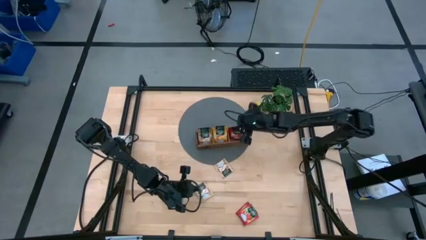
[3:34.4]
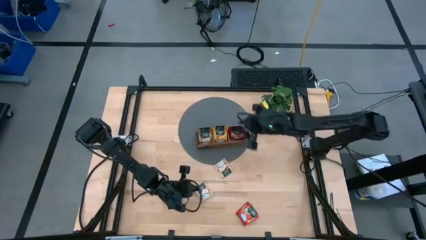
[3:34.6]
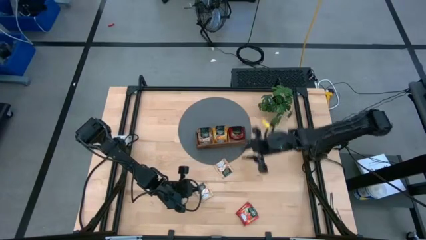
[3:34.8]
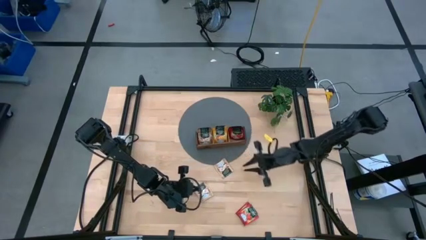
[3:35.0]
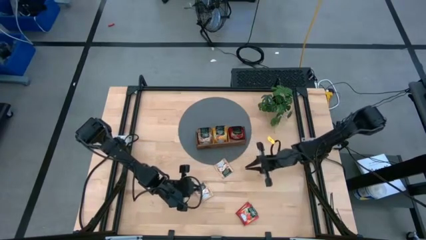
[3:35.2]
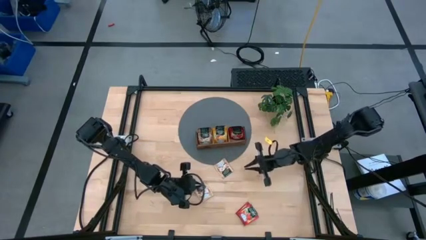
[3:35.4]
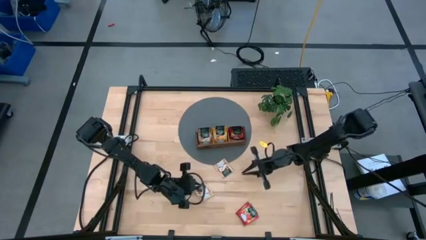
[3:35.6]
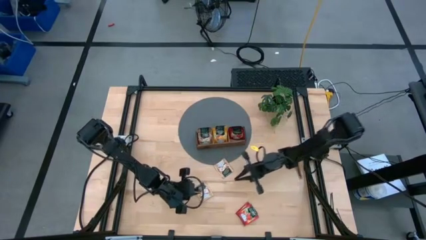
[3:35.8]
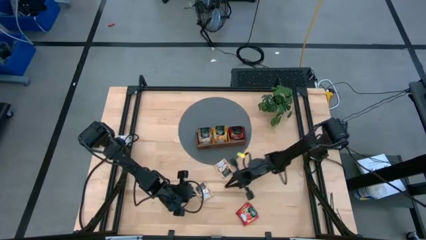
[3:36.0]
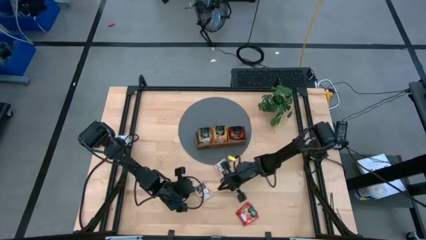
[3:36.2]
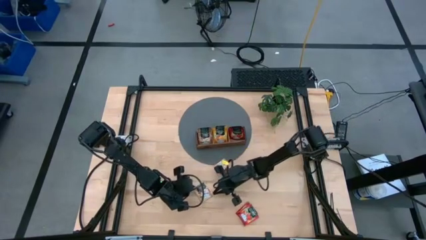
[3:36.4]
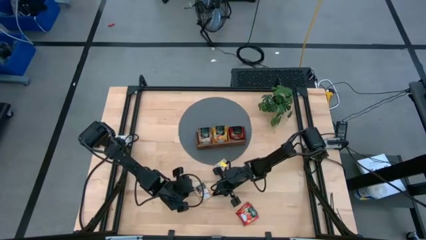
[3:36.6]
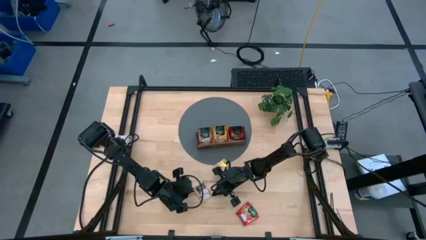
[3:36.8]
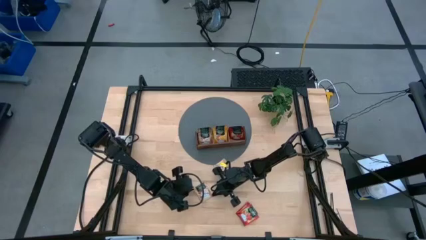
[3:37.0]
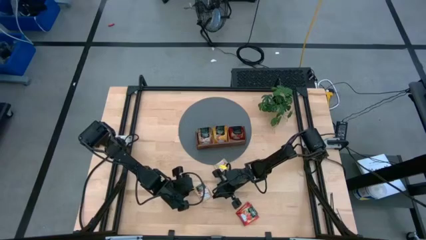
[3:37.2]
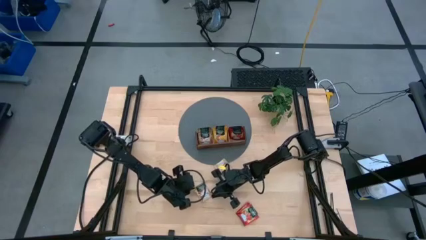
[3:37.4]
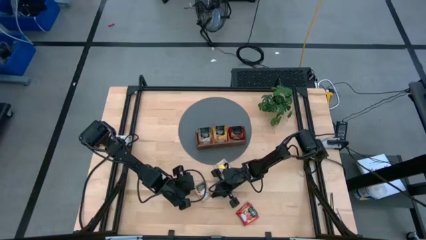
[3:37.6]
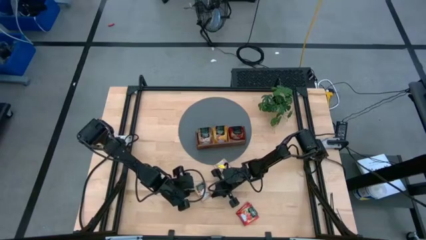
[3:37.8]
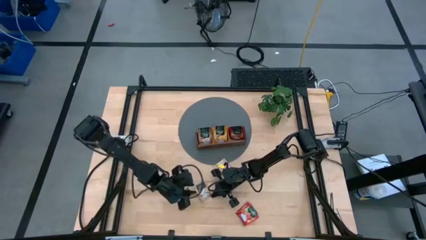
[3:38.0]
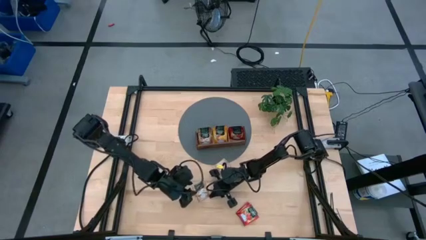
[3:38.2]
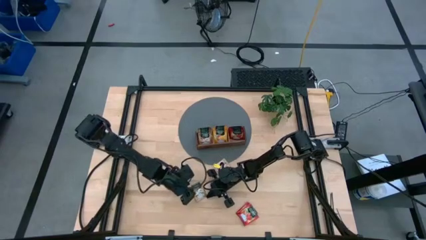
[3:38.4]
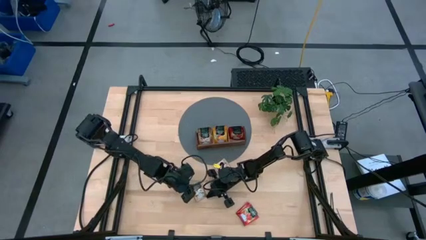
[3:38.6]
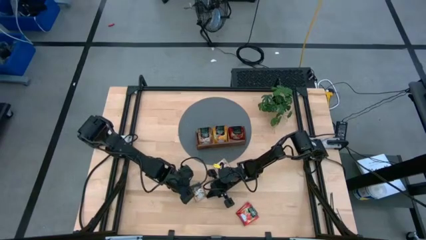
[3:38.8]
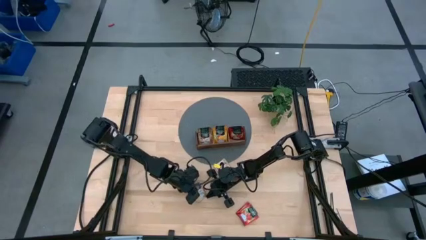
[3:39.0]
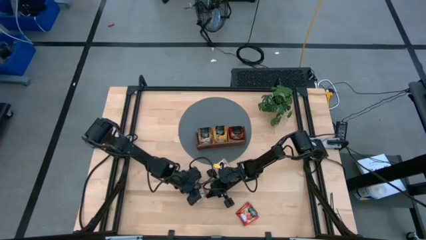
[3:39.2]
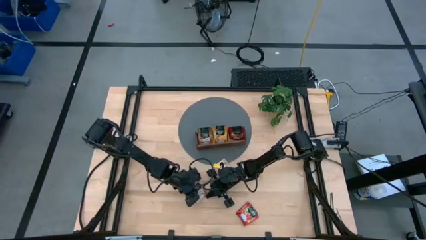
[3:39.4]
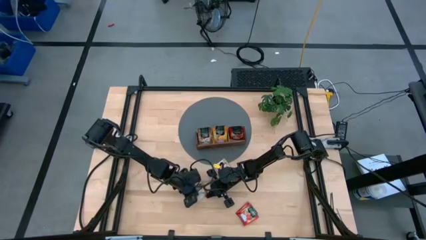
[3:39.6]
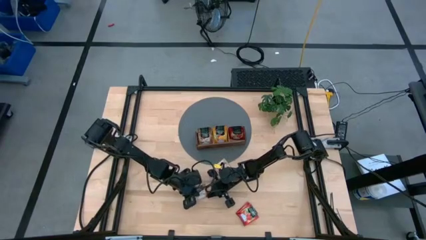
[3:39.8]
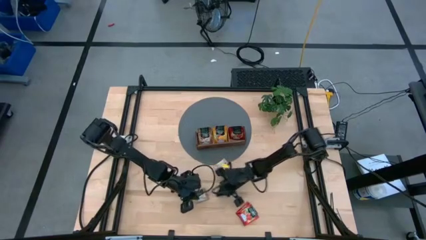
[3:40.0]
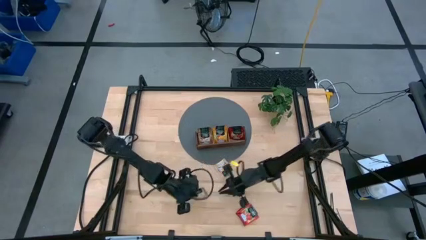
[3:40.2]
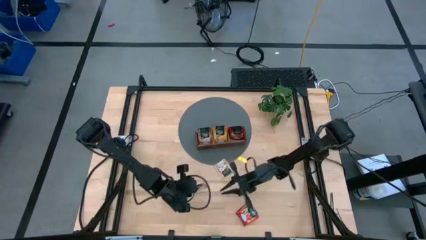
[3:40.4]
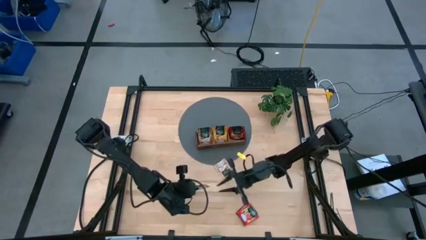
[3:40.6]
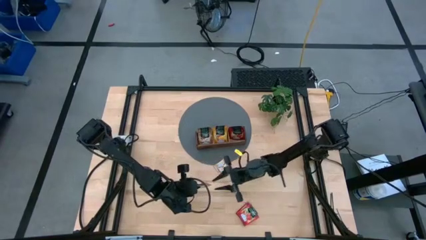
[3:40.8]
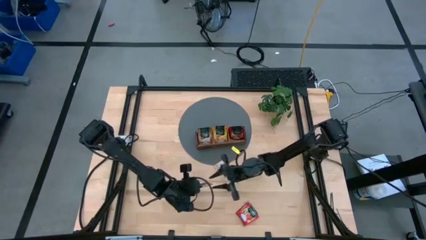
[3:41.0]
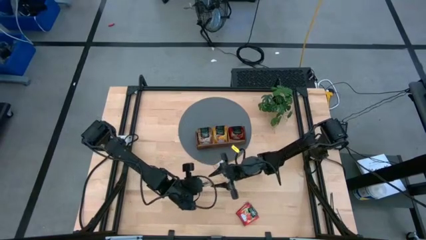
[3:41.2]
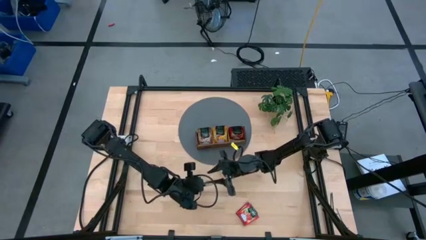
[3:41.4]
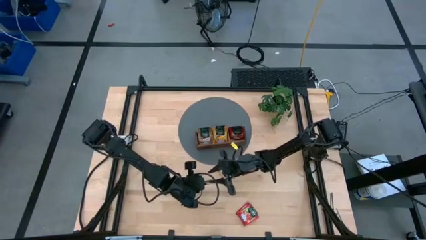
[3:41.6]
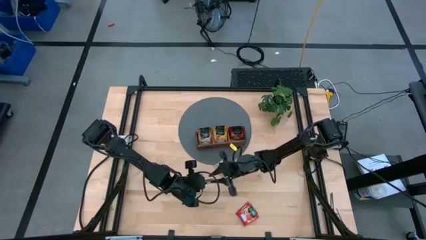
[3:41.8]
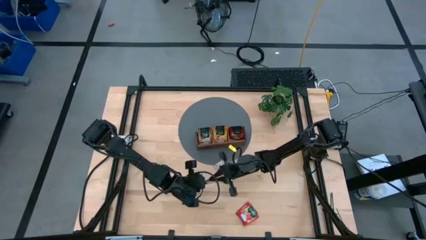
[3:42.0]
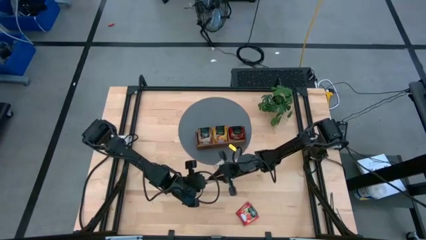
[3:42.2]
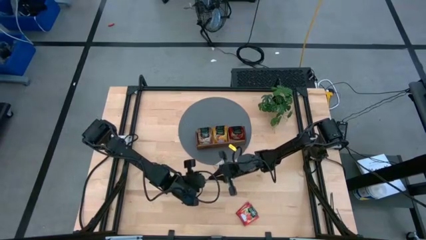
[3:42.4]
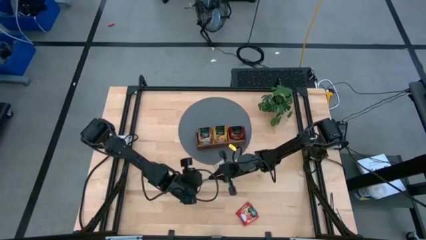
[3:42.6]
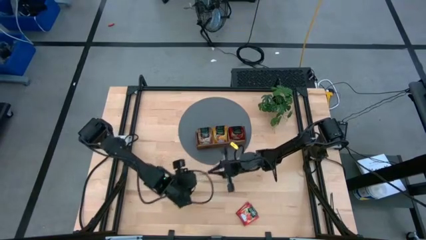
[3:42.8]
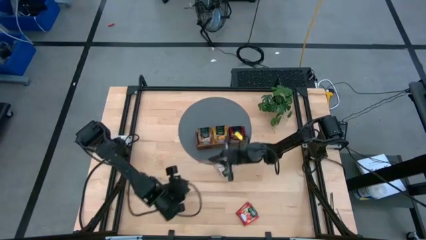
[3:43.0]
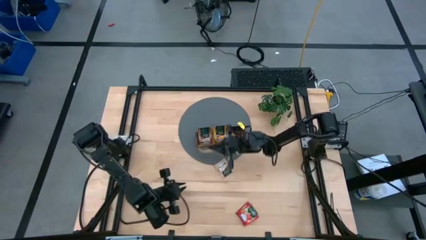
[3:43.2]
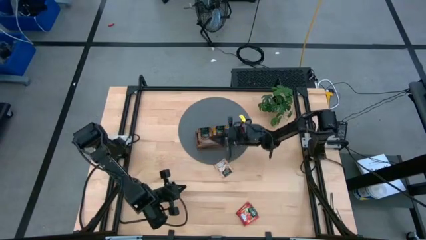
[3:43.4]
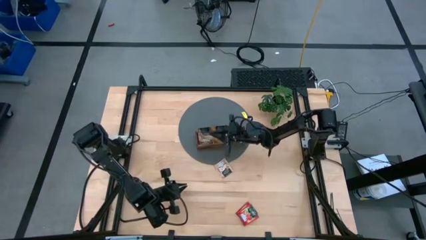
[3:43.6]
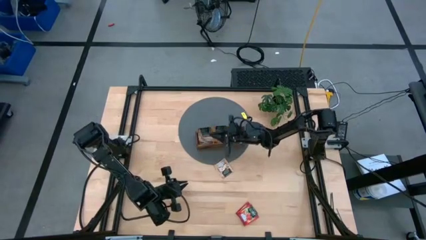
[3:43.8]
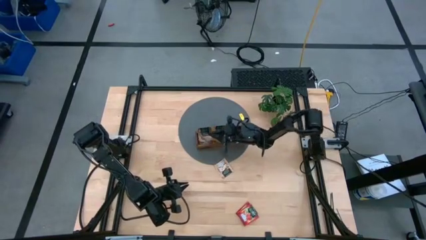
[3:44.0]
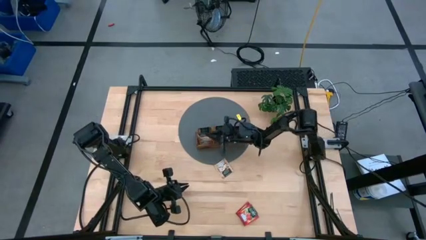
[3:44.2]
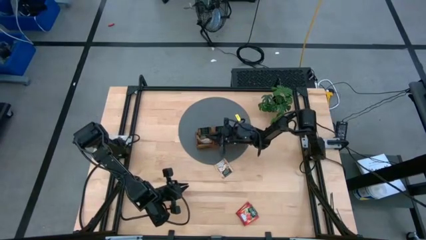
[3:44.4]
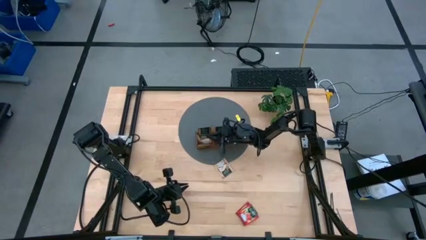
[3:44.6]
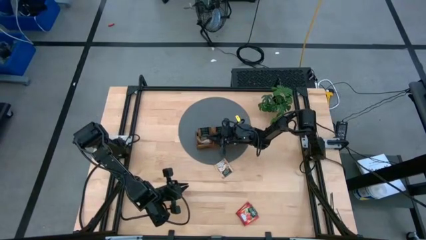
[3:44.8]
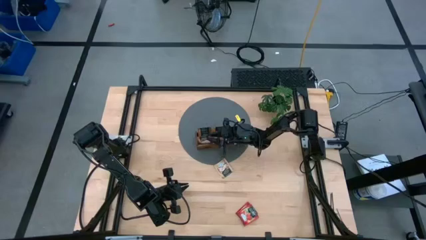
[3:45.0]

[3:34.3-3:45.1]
Task: Pick & Place Tea
Put the brown tea bag into the left section of the wooden organizer

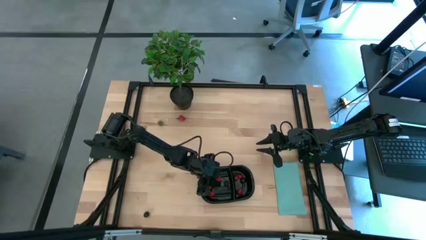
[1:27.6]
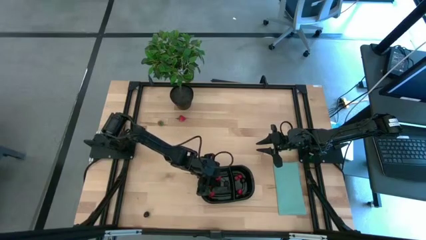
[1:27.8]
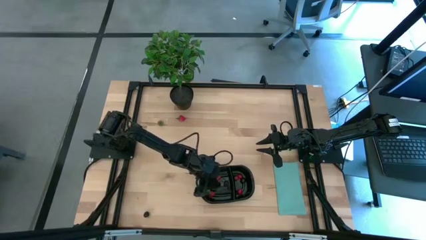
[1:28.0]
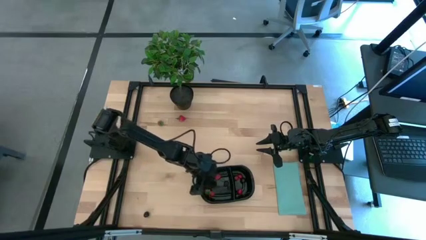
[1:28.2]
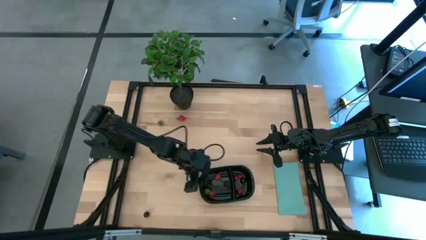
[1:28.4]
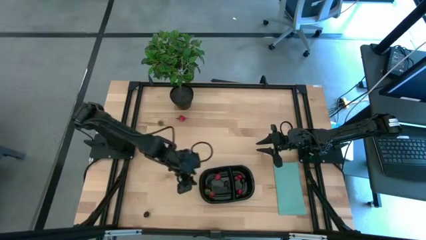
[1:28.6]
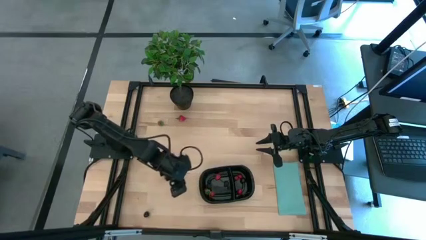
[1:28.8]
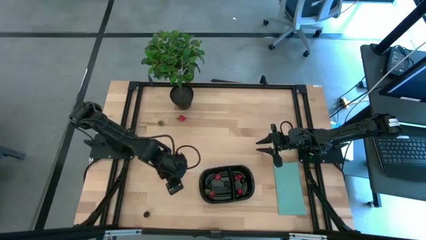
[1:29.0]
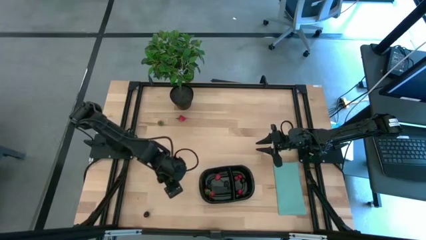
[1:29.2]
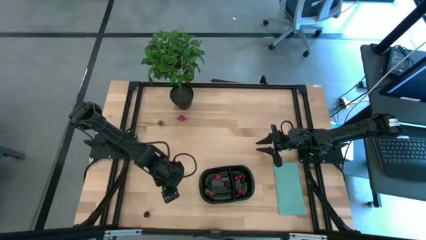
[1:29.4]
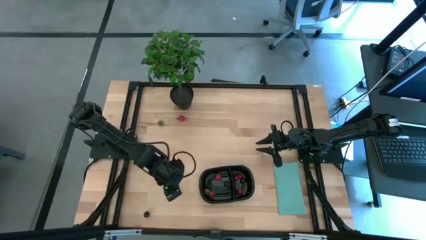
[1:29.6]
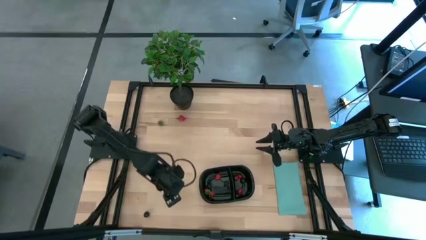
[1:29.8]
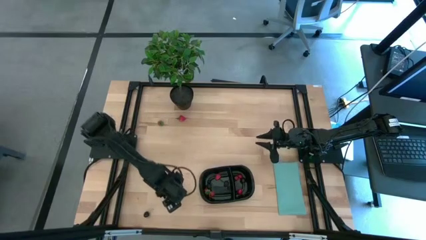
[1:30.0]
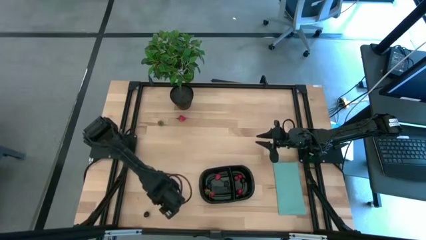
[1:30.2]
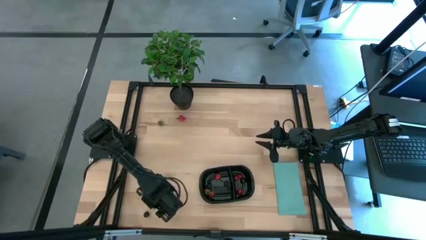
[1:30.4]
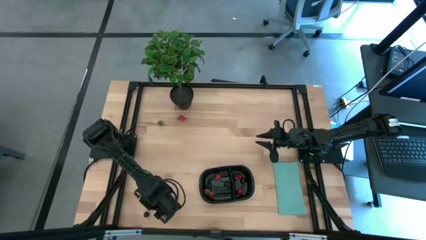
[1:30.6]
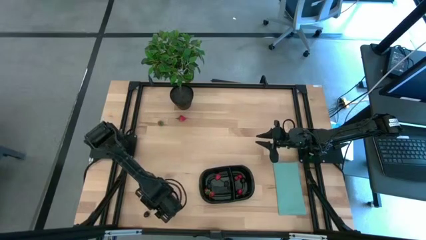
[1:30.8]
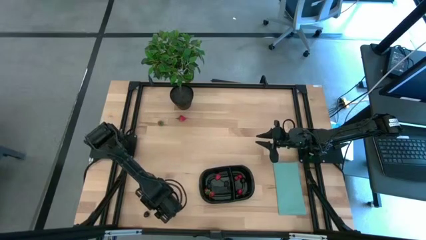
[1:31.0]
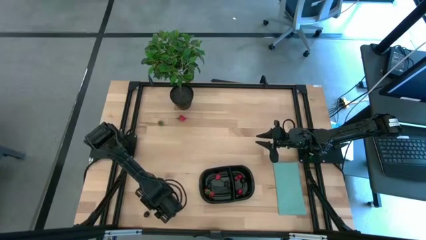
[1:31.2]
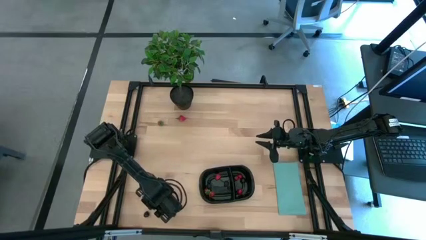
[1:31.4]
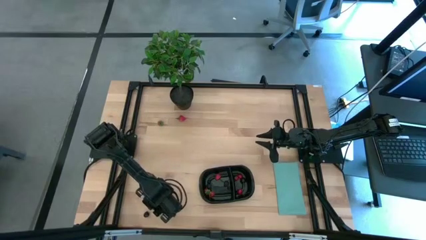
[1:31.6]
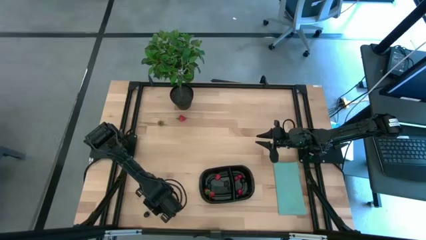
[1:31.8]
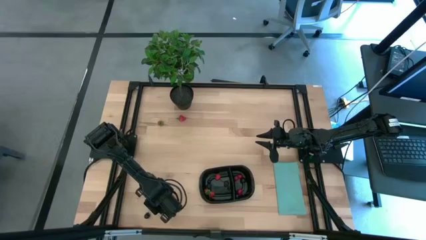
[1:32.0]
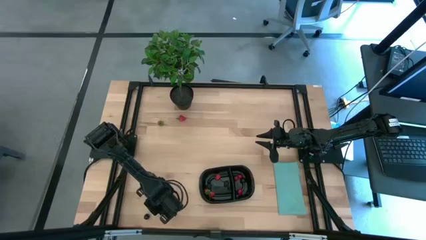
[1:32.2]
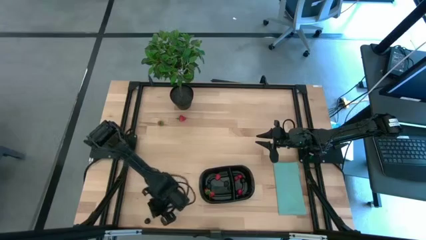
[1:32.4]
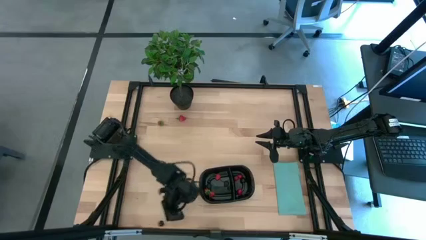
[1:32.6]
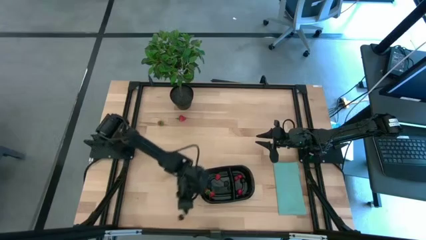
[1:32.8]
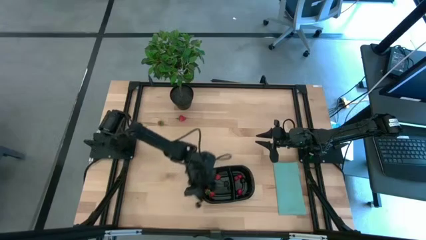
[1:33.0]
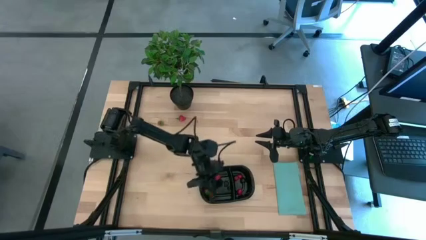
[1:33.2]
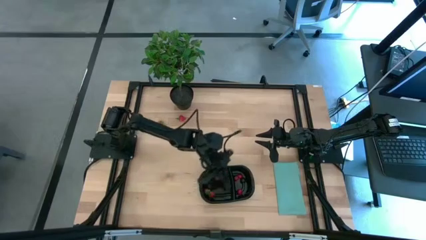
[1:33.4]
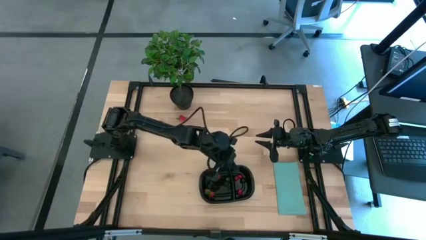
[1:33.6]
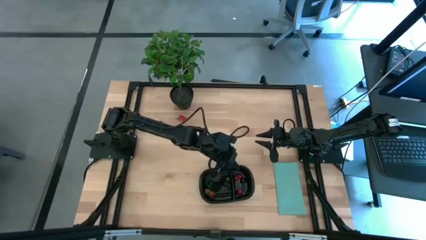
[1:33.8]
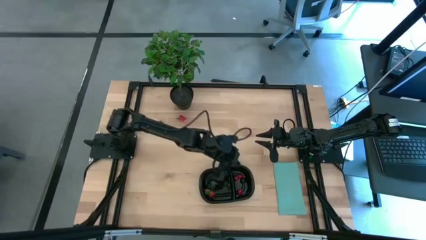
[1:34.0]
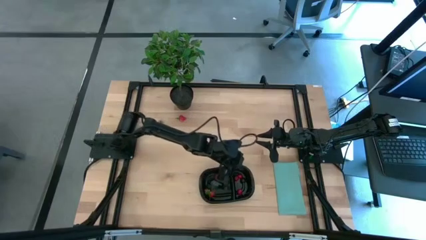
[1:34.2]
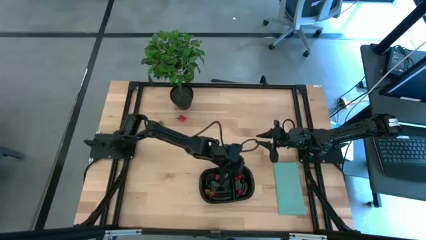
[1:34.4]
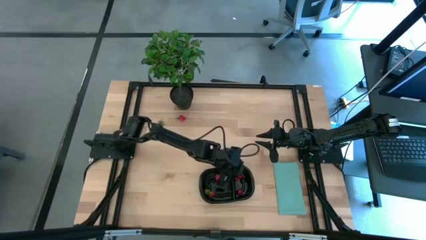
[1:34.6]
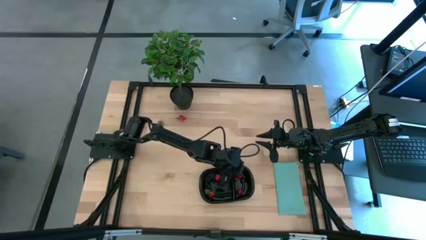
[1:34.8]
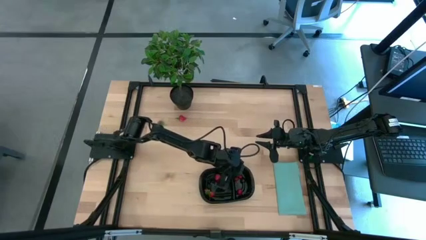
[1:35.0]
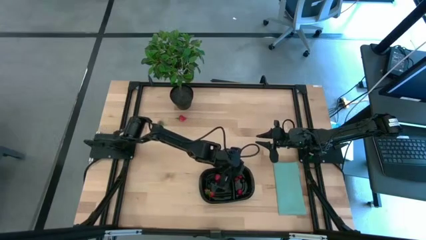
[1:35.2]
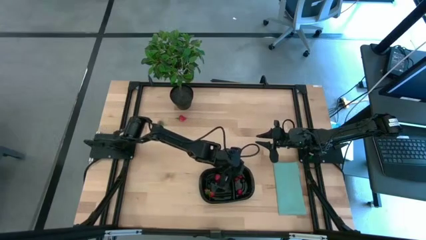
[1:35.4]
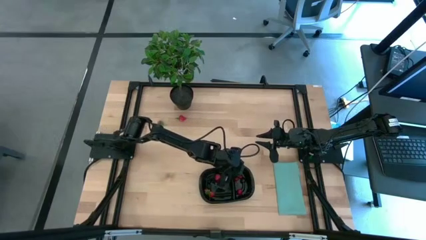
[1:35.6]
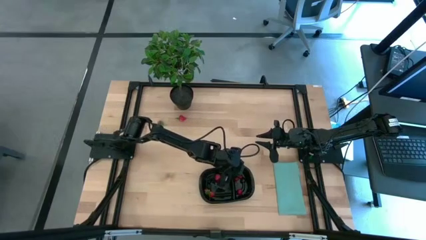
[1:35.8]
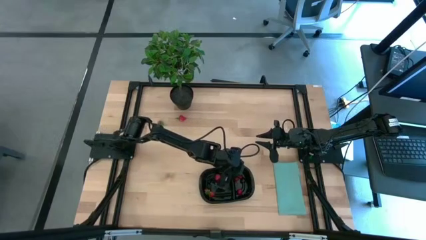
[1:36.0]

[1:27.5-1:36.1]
Task: Pick and placing Produce into tupperware
Put the black cherry into the right side of the black container
